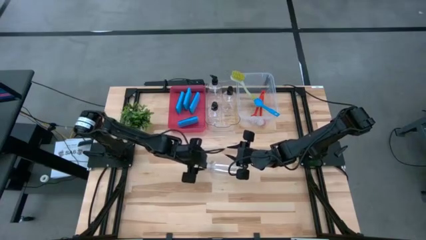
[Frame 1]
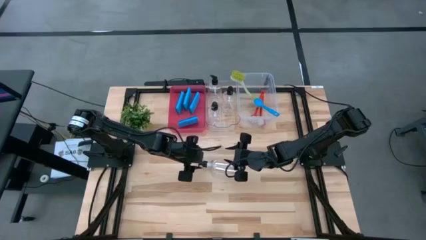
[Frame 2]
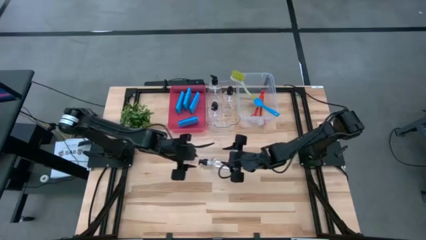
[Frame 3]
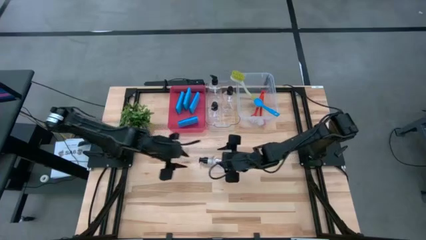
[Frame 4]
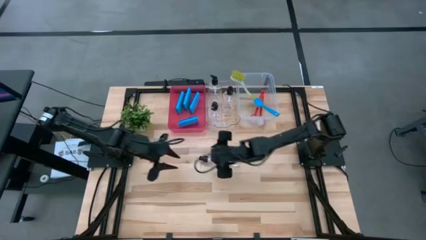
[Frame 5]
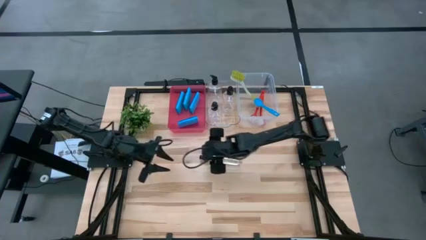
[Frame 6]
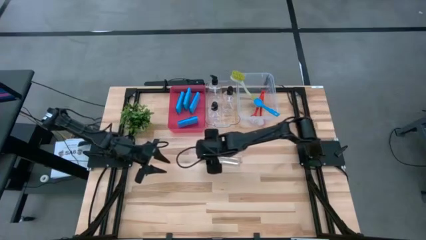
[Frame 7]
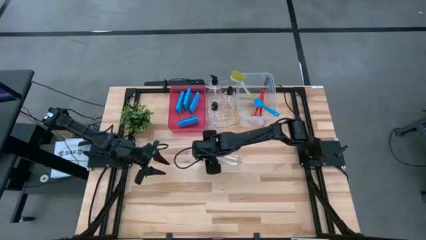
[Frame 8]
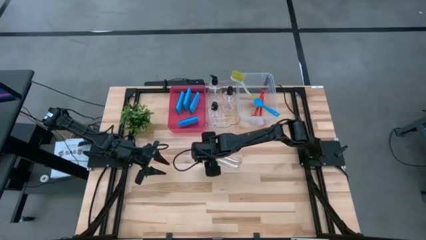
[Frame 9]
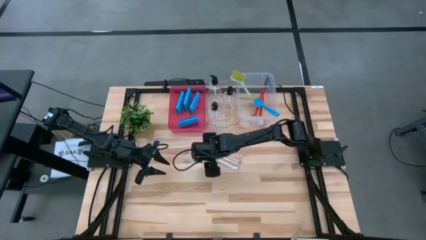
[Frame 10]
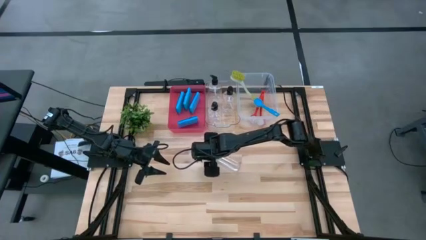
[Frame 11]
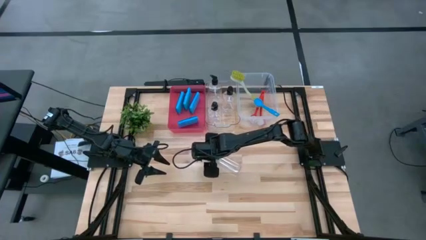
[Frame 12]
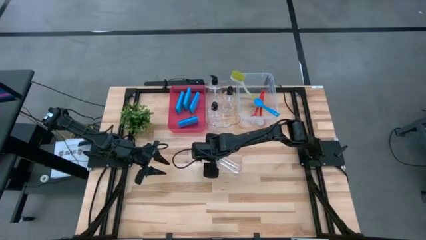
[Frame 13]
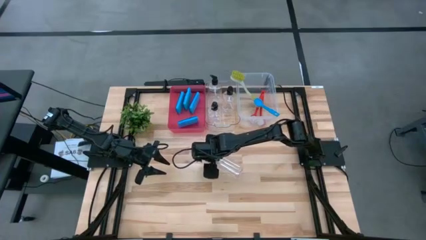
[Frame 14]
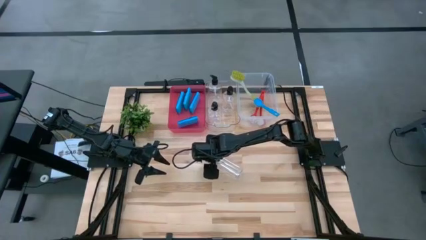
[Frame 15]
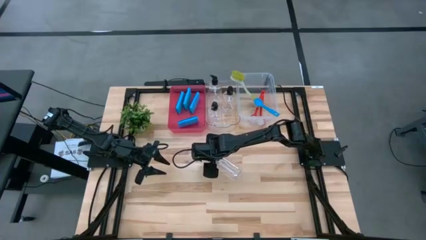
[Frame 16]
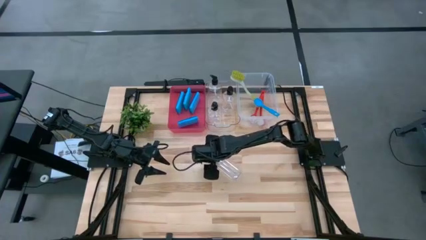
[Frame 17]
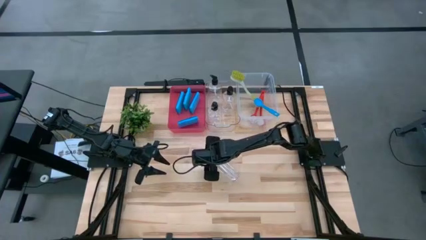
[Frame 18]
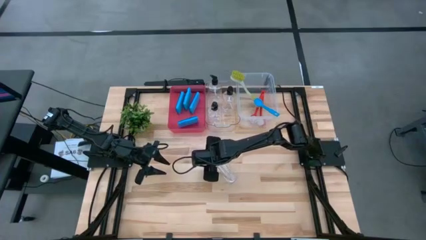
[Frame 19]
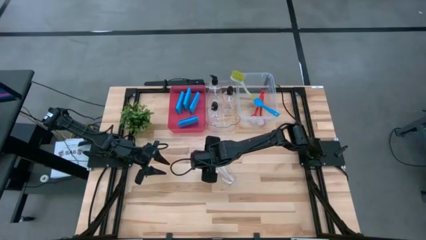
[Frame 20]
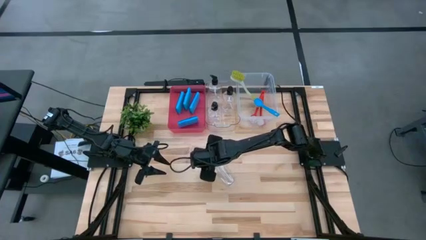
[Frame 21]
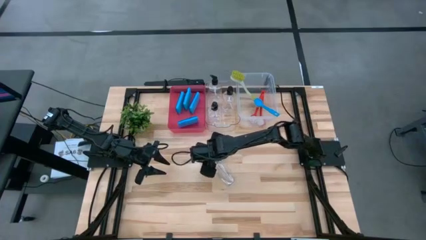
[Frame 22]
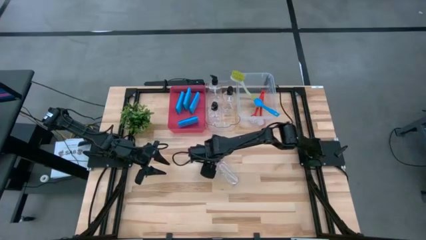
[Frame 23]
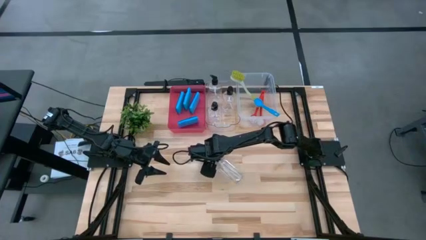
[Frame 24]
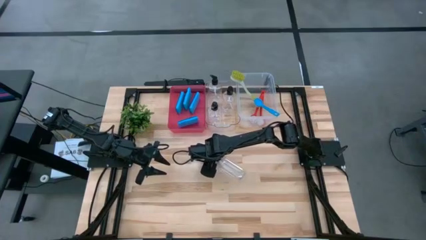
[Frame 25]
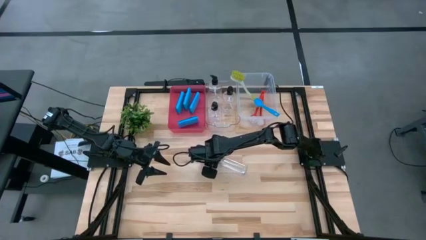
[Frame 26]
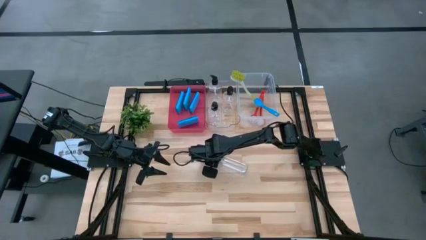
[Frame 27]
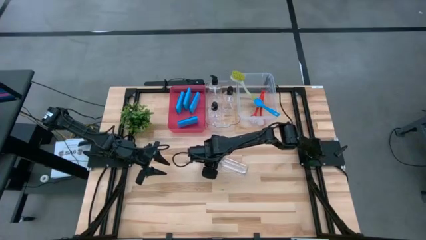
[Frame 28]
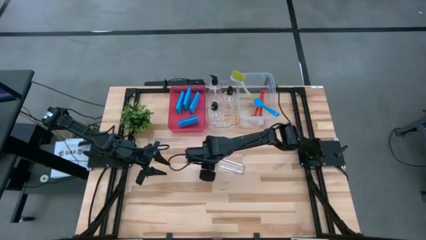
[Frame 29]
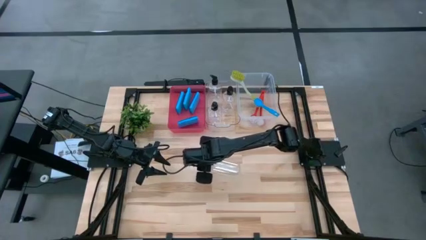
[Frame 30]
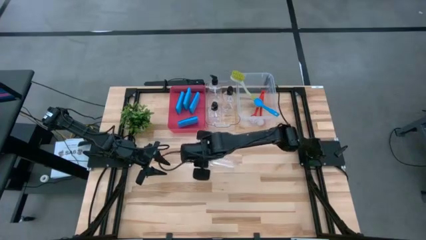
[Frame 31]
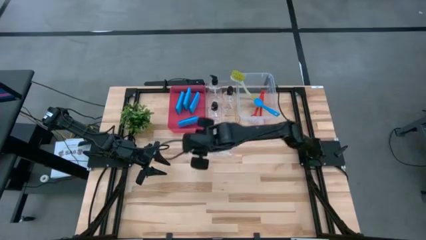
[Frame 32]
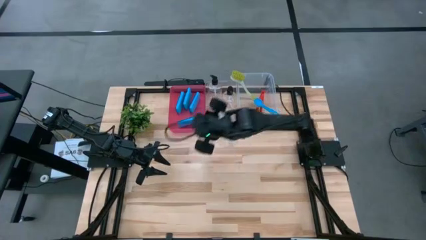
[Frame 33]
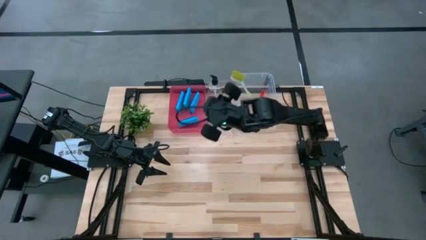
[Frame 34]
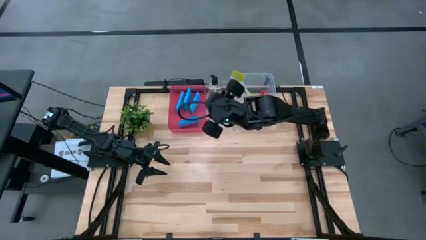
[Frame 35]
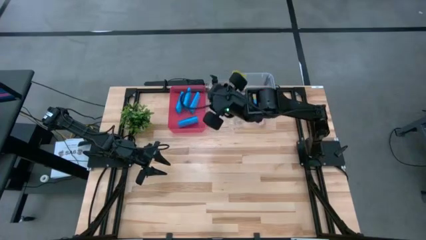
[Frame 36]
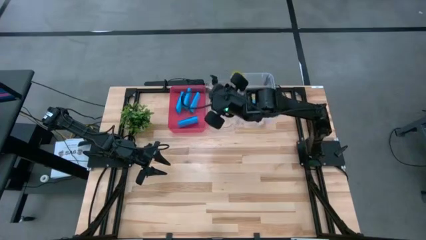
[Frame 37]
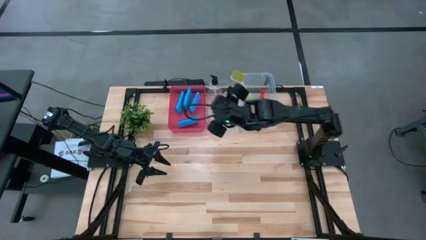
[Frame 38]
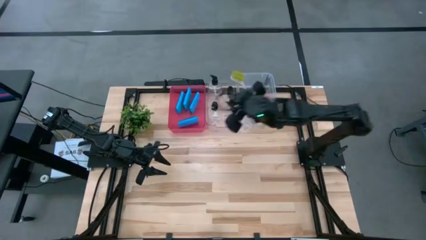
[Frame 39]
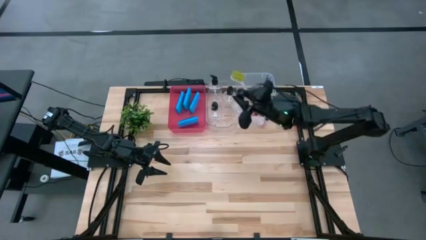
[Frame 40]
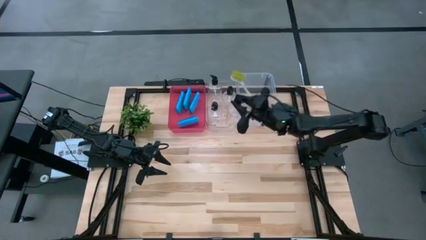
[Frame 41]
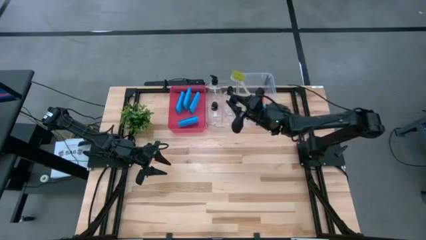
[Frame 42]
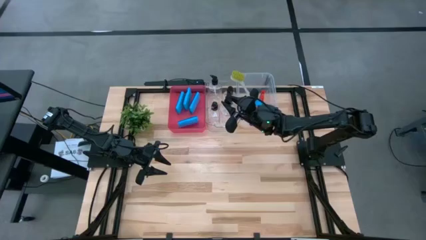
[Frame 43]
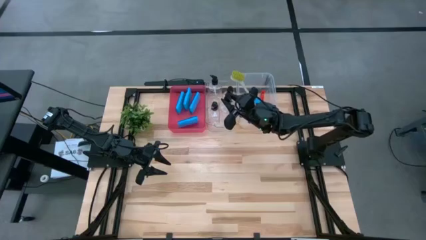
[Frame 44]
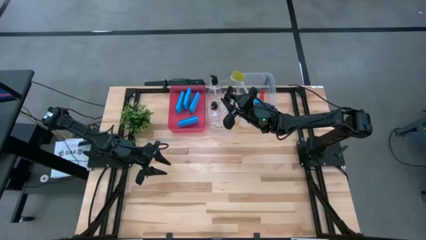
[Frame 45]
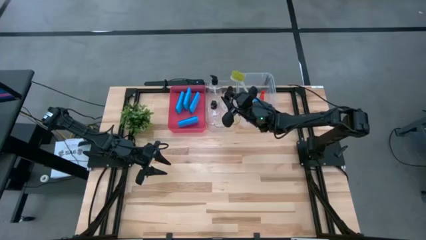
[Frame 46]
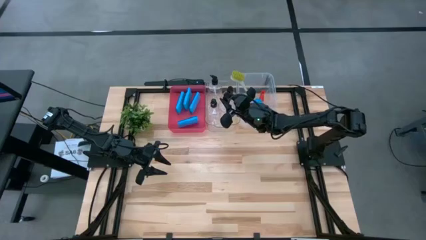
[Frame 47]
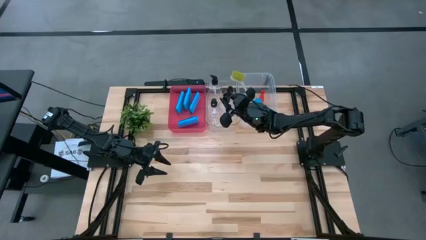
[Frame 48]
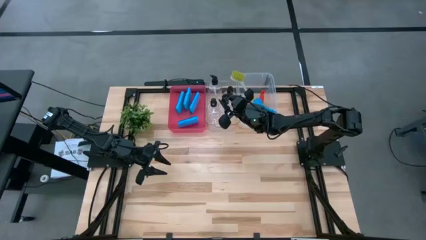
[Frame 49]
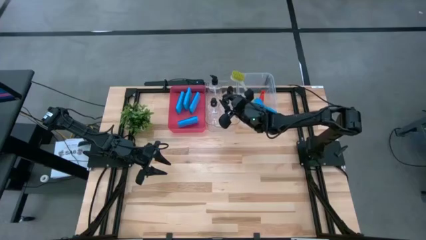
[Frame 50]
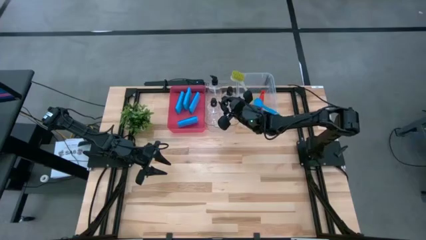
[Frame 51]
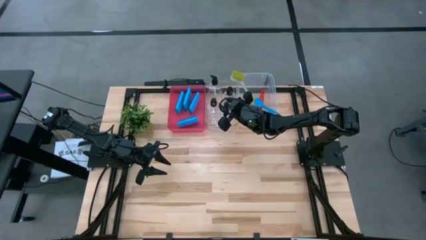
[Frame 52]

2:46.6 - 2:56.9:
Task: Pick & Place Kitchen Sink Supplies
Put the spray bottle into the transparent bin

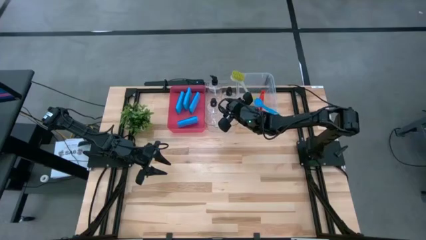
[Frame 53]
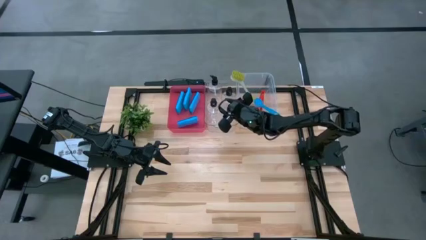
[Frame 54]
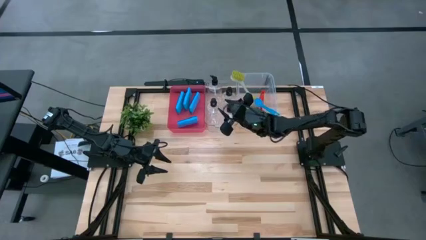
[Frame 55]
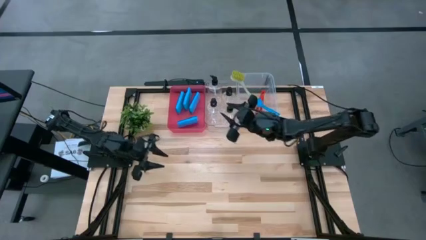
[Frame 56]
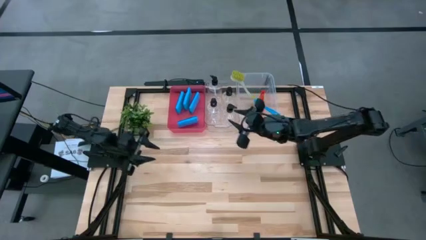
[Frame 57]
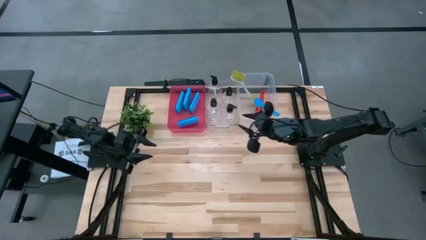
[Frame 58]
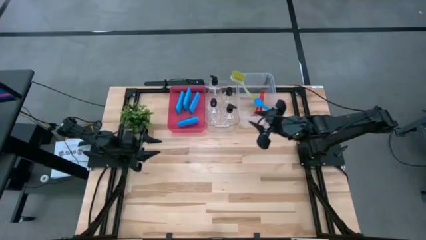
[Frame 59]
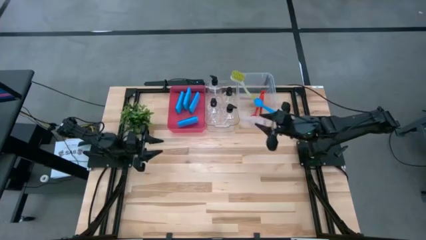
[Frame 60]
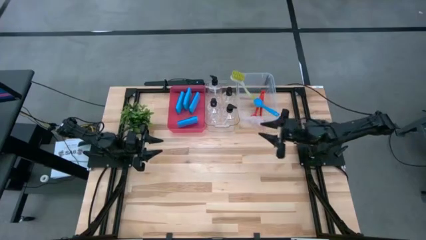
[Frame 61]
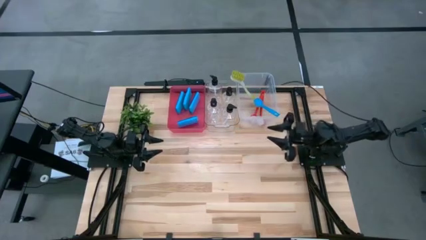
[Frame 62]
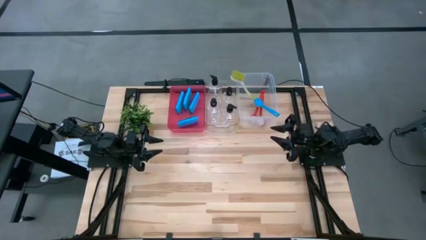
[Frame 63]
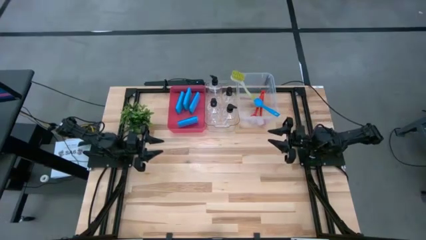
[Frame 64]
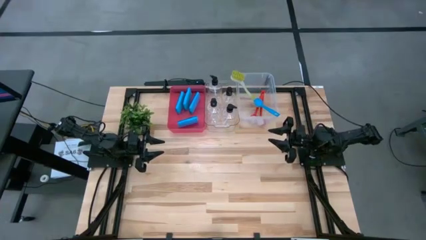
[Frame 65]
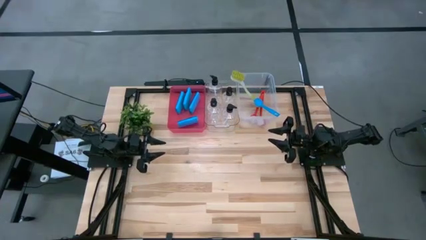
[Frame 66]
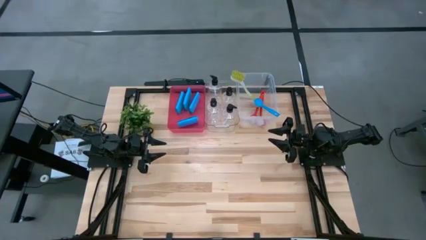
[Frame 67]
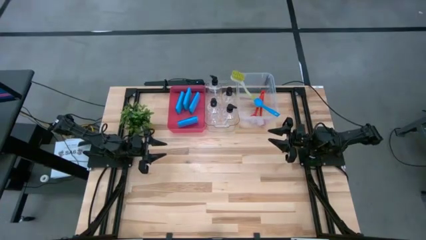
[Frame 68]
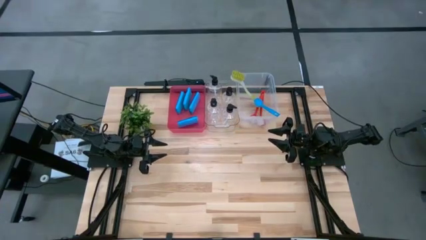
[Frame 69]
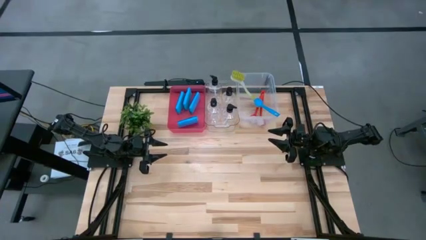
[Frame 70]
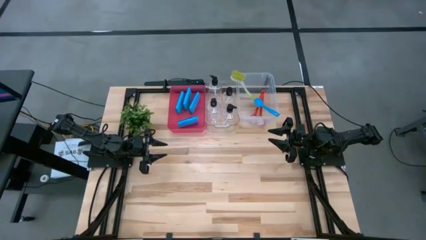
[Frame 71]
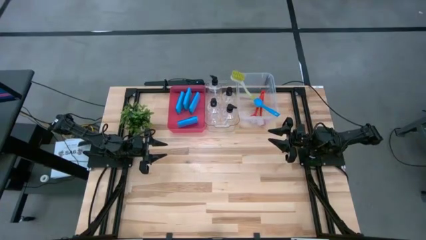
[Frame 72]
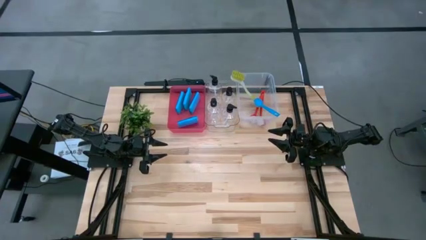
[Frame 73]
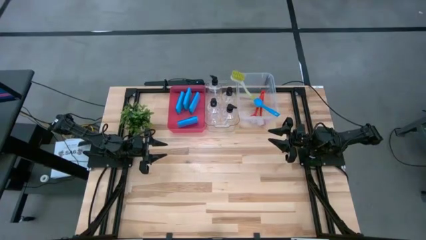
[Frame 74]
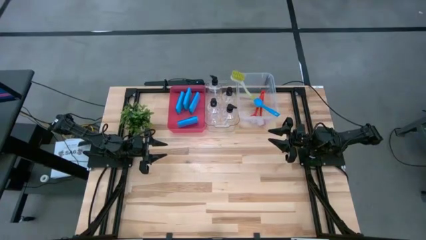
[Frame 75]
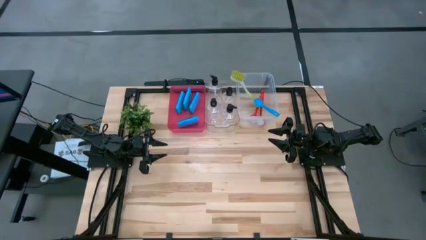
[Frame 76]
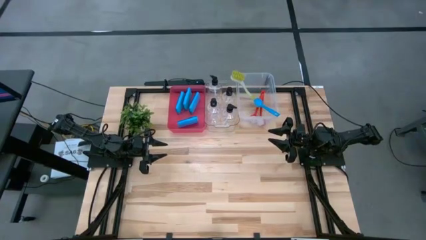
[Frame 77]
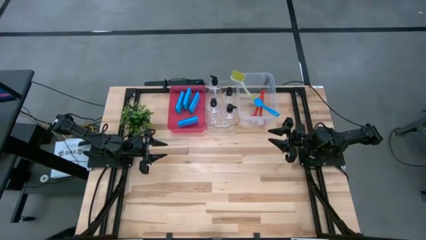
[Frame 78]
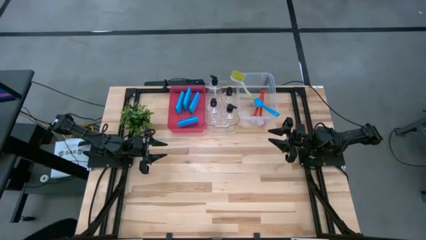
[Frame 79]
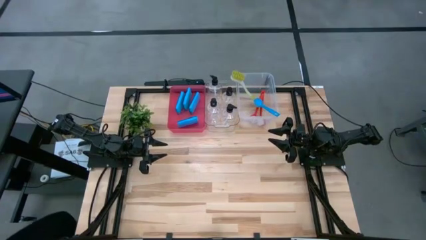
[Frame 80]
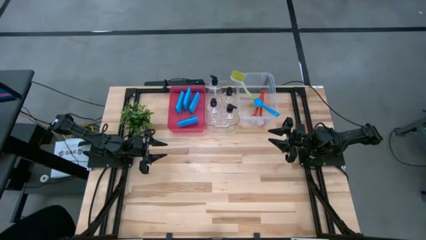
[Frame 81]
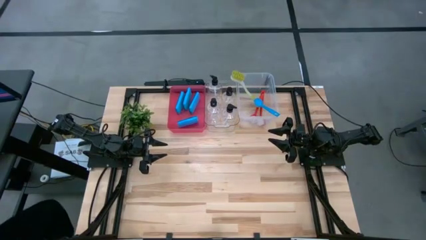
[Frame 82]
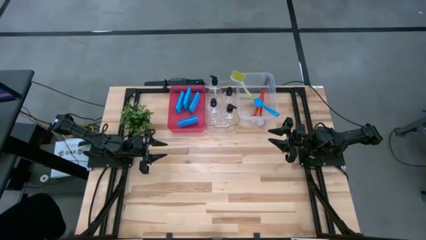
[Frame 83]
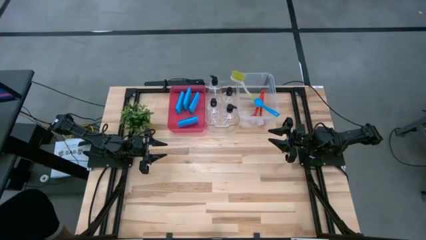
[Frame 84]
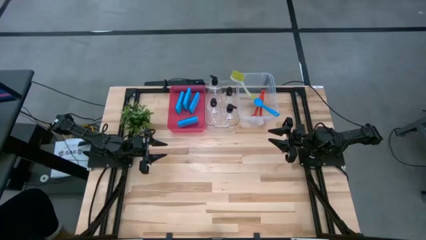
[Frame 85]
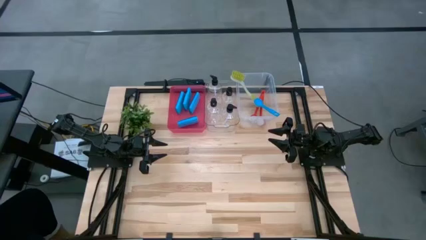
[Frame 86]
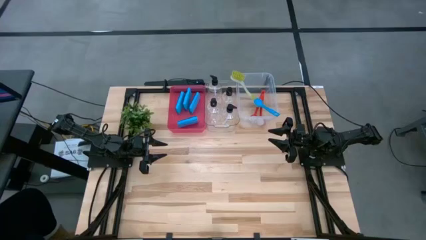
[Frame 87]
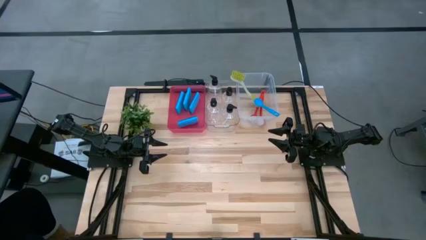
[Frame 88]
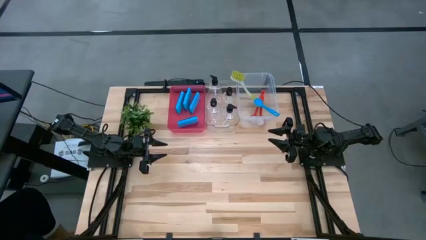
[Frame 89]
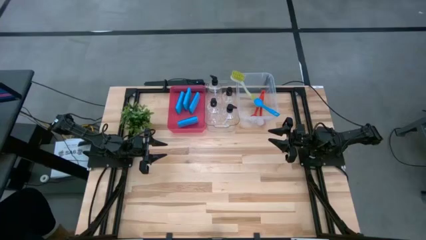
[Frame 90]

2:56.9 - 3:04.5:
Return to Home Position
